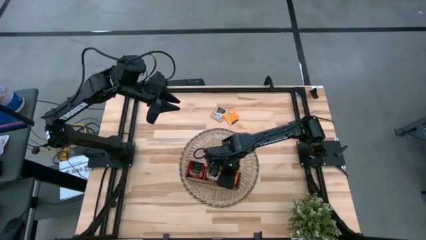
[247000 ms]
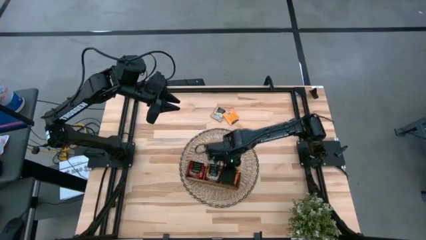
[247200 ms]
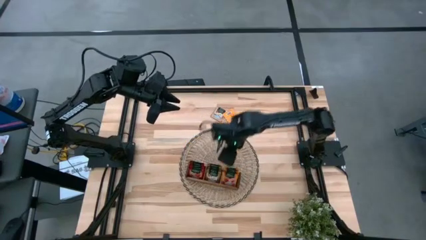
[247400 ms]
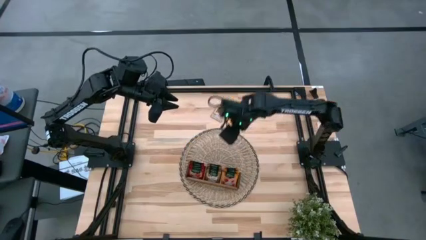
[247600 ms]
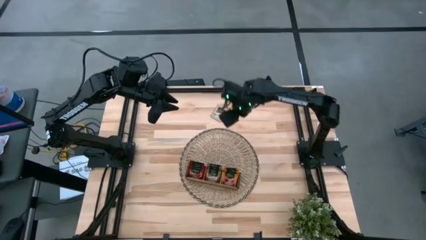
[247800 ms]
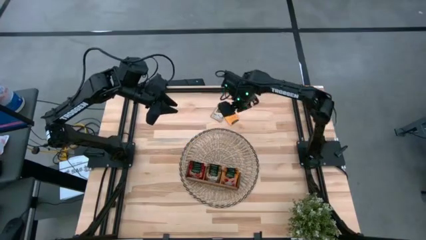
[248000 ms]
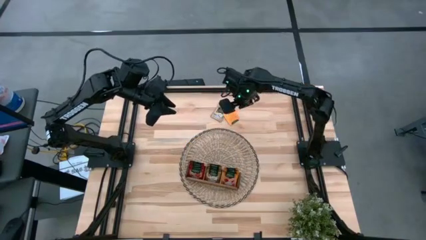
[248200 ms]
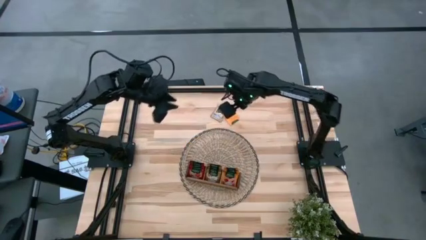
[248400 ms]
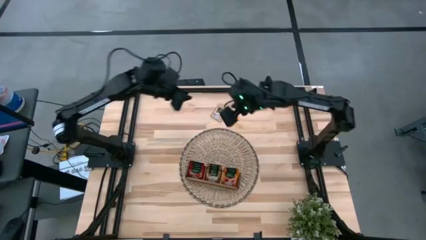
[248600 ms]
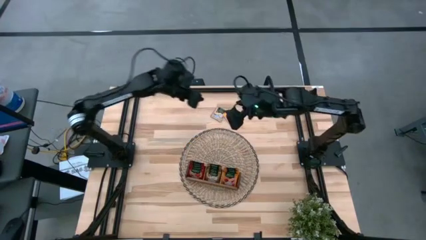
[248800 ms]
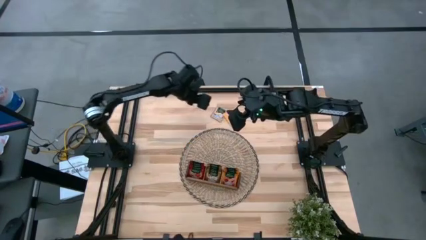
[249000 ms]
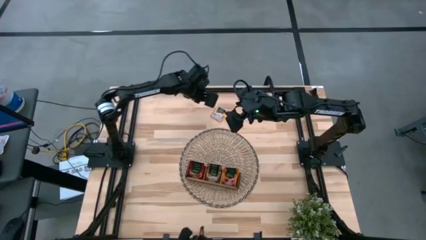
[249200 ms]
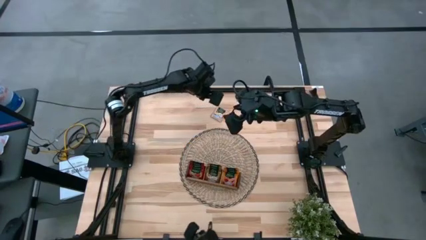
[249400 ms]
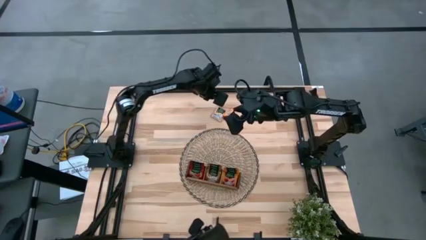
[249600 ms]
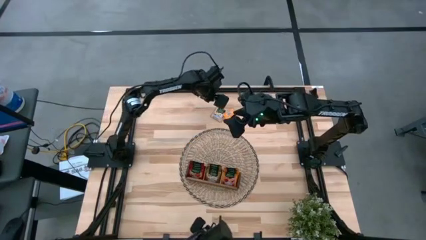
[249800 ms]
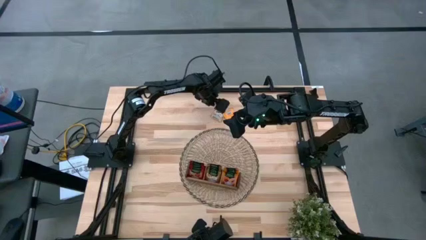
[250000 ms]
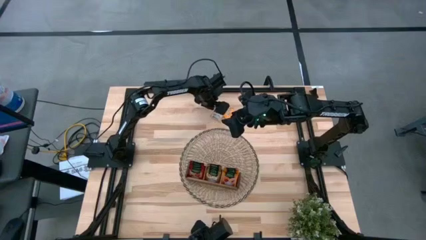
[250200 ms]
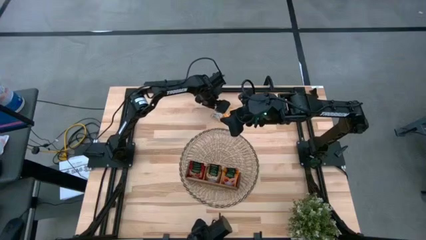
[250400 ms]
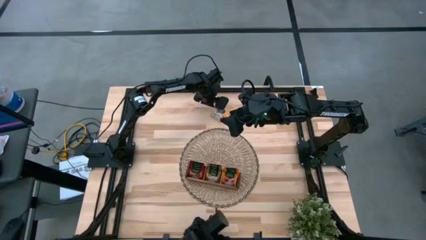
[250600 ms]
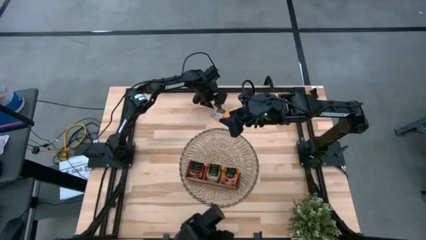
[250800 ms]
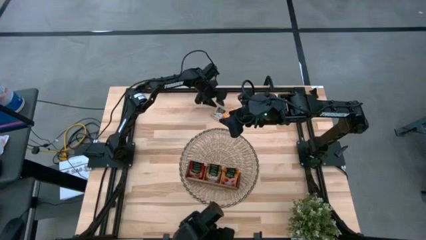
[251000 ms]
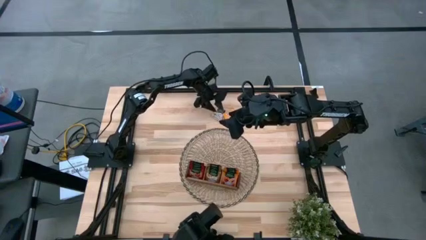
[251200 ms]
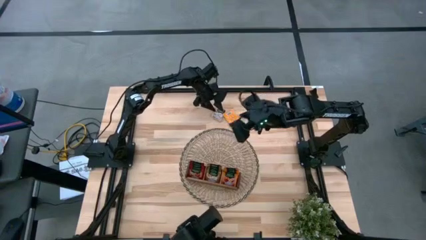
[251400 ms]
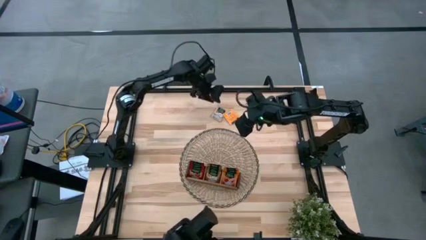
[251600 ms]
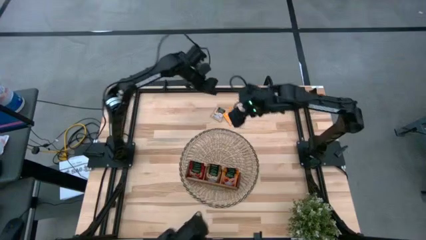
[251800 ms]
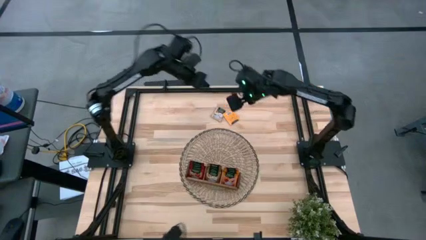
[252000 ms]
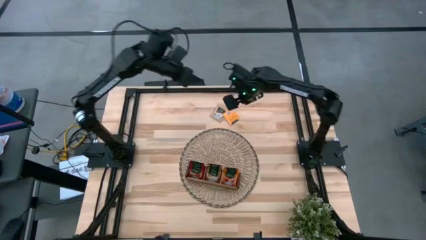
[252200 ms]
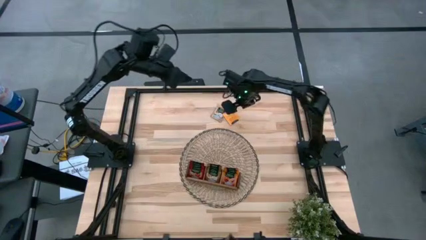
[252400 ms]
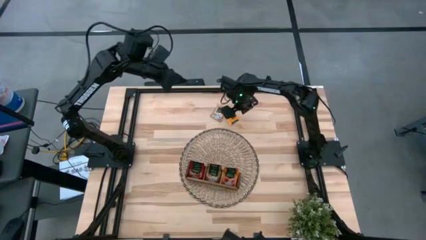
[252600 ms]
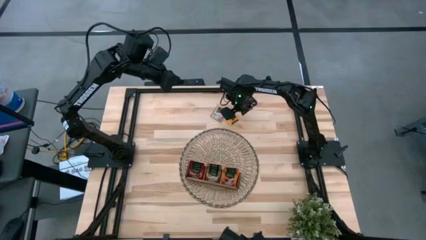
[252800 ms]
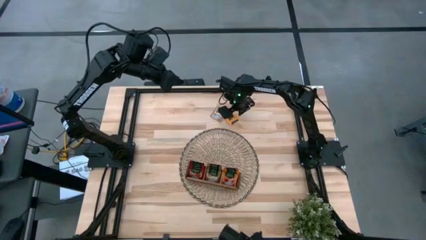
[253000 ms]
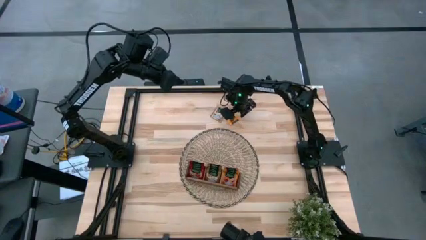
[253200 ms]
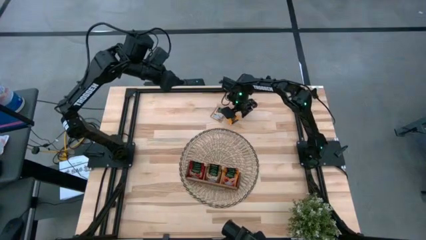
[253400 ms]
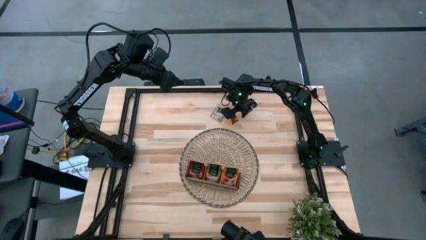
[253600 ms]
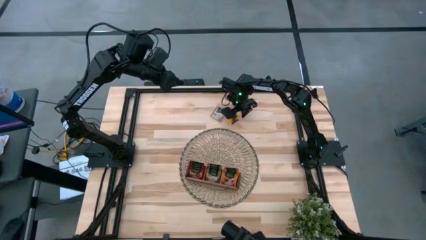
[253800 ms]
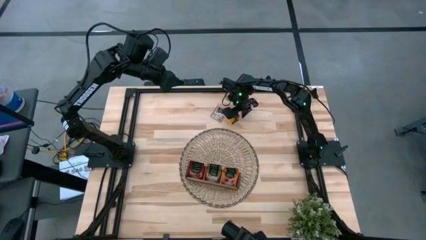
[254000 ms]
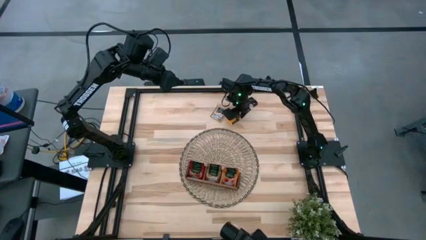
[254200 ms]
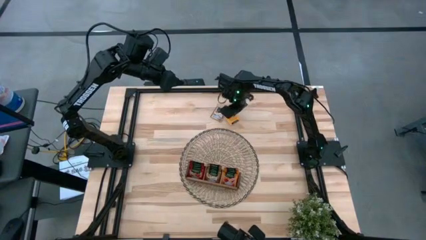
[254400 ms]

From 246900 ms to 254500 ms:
Task: Pick & Place Tea
Put the orange tea bag into the right section of the wooden organizer

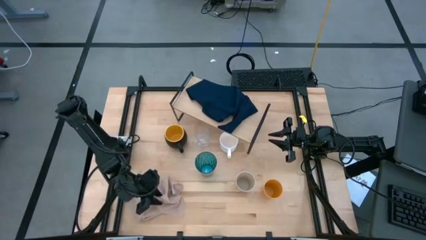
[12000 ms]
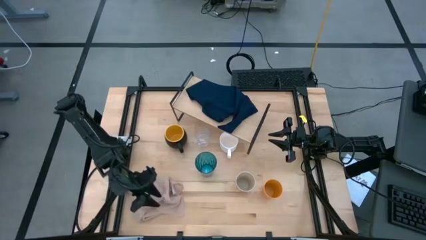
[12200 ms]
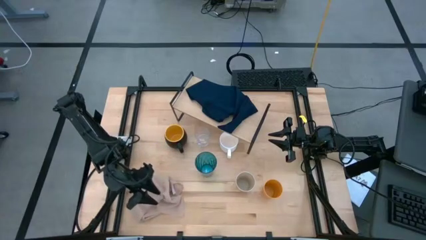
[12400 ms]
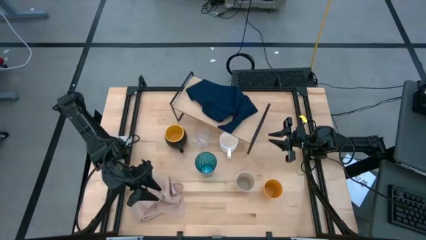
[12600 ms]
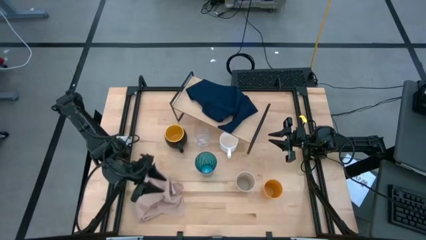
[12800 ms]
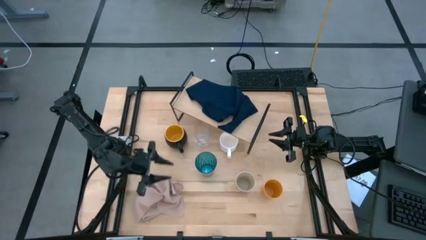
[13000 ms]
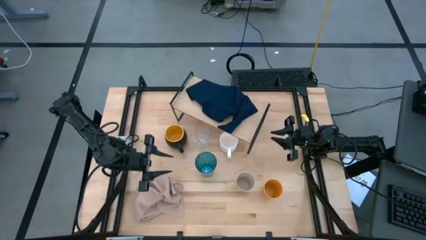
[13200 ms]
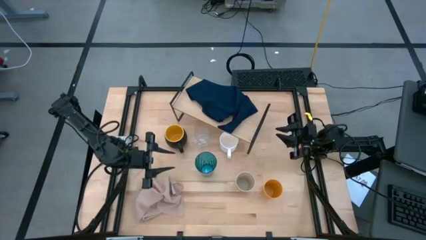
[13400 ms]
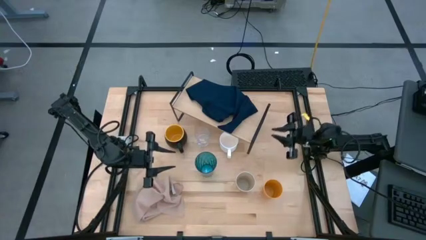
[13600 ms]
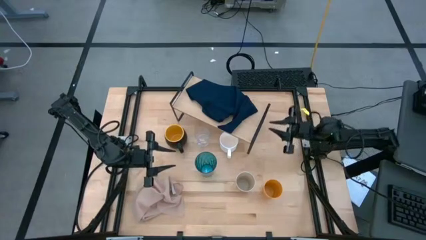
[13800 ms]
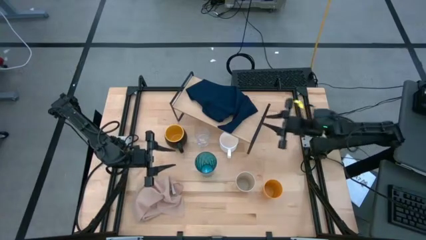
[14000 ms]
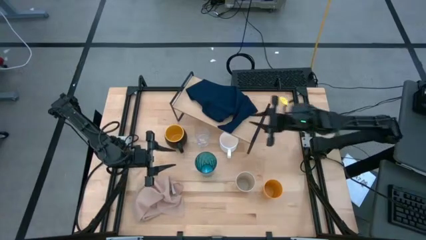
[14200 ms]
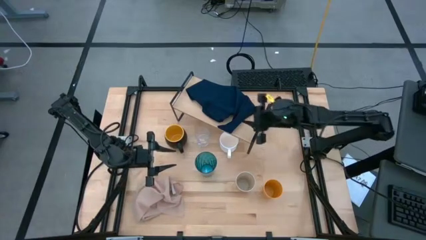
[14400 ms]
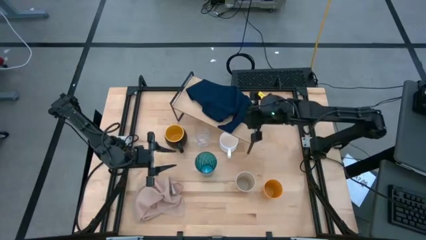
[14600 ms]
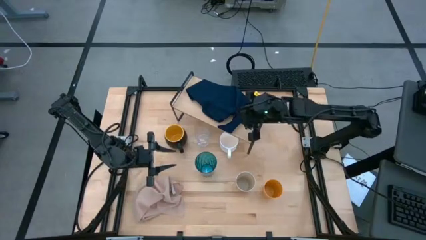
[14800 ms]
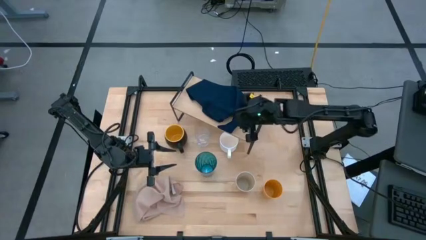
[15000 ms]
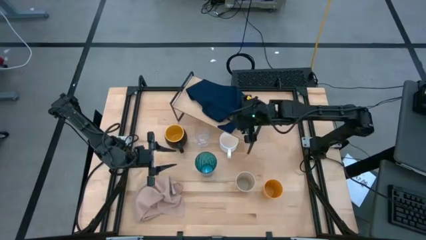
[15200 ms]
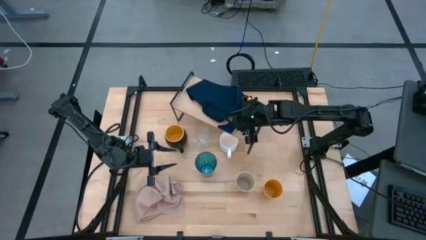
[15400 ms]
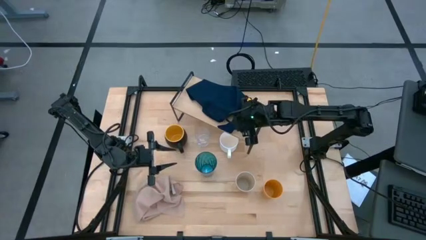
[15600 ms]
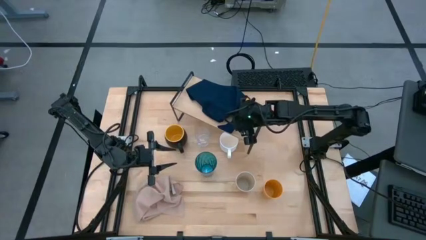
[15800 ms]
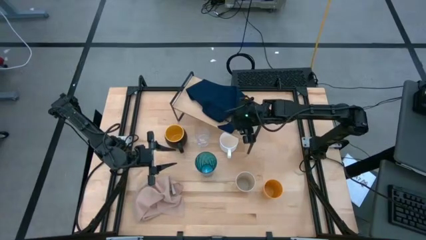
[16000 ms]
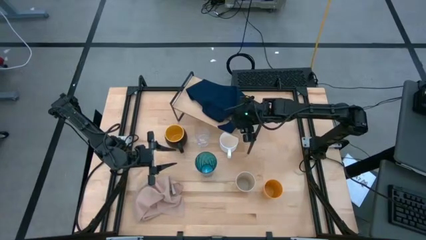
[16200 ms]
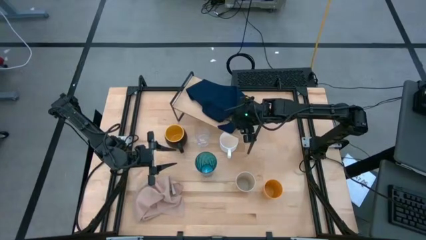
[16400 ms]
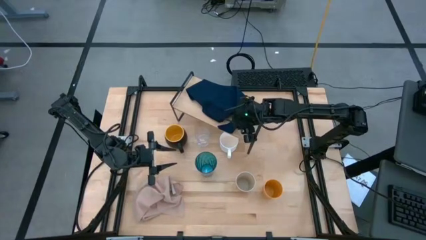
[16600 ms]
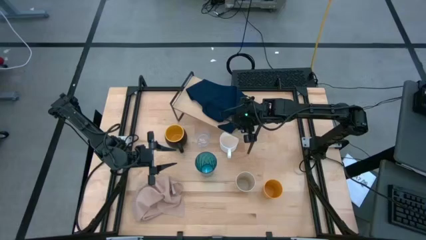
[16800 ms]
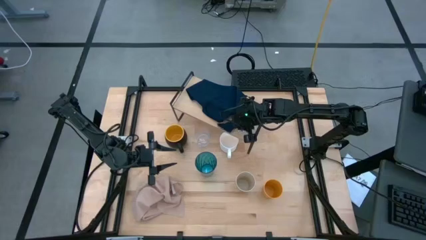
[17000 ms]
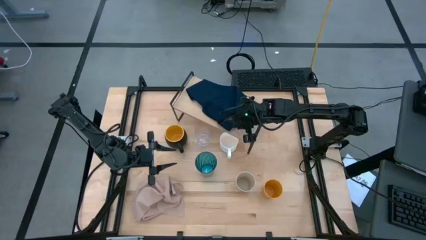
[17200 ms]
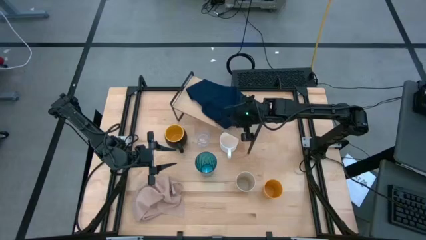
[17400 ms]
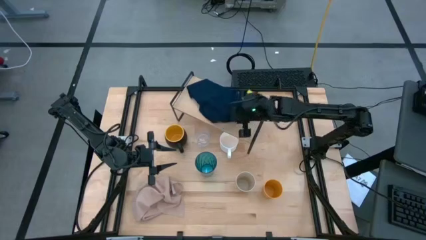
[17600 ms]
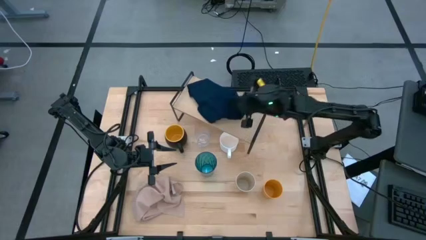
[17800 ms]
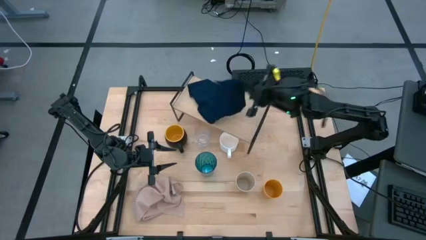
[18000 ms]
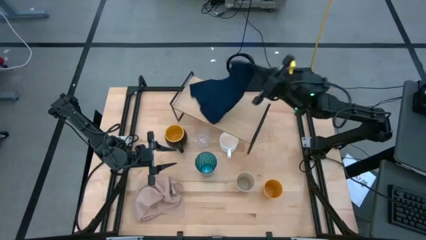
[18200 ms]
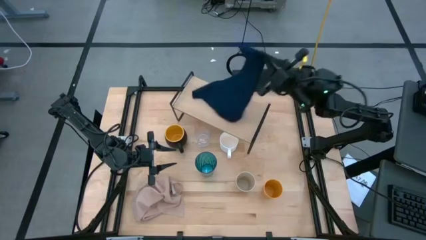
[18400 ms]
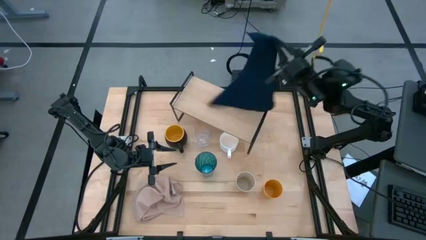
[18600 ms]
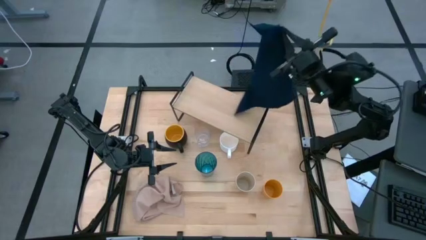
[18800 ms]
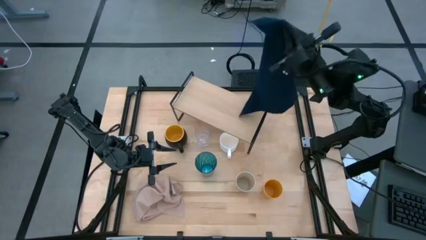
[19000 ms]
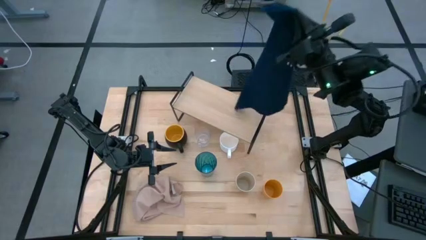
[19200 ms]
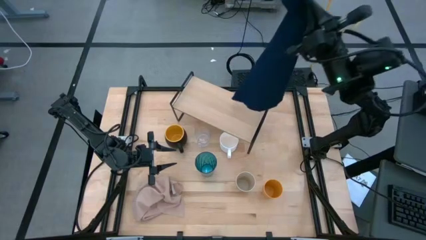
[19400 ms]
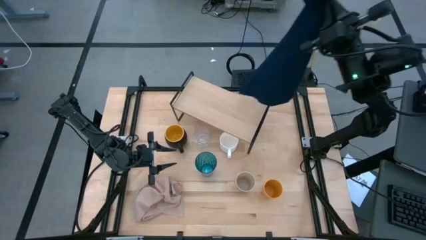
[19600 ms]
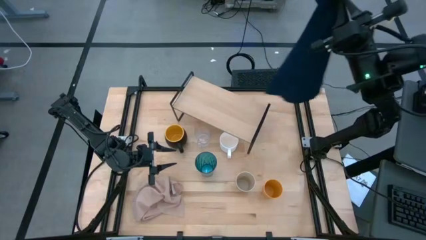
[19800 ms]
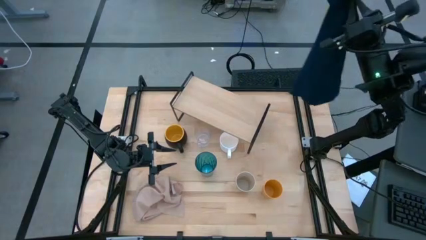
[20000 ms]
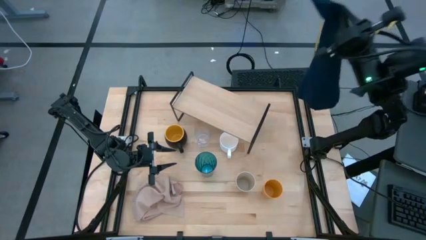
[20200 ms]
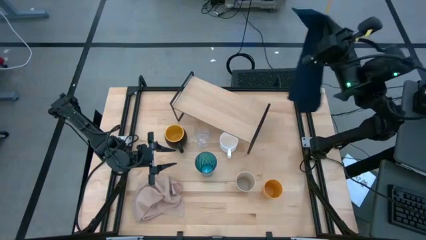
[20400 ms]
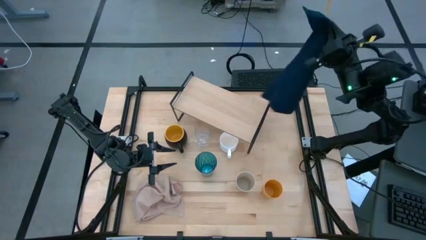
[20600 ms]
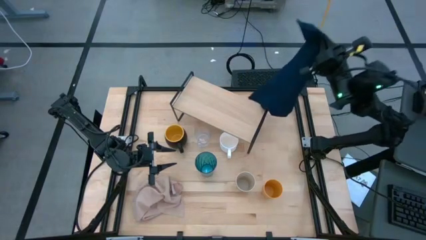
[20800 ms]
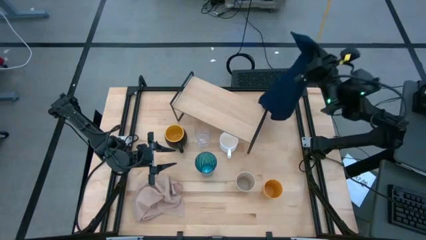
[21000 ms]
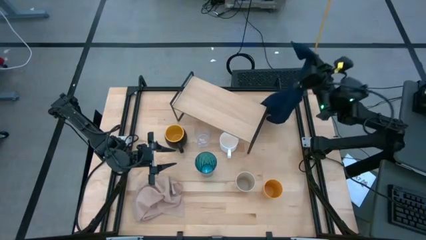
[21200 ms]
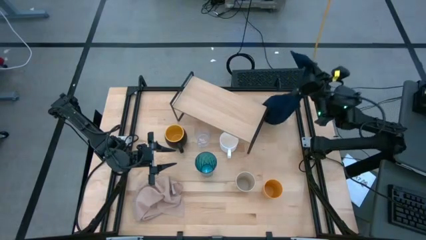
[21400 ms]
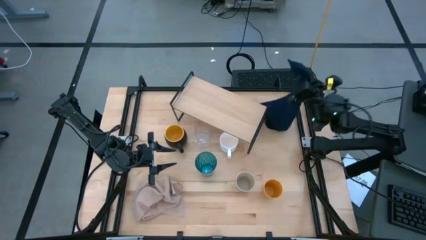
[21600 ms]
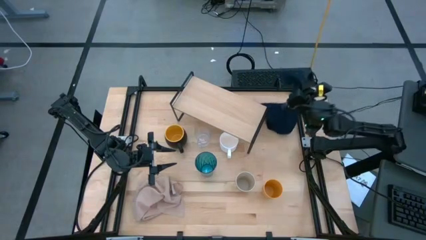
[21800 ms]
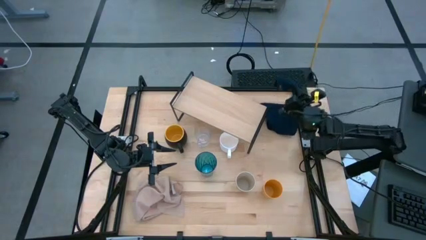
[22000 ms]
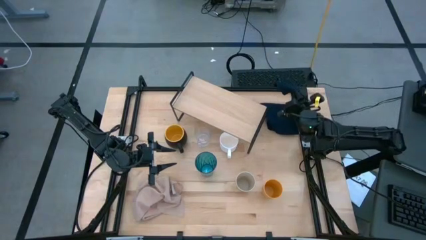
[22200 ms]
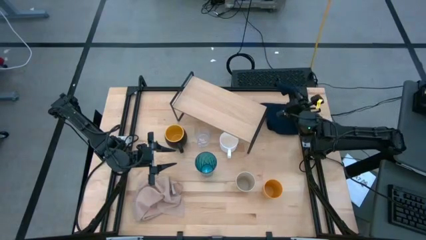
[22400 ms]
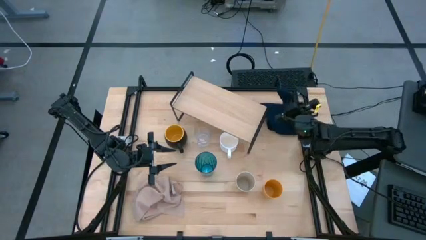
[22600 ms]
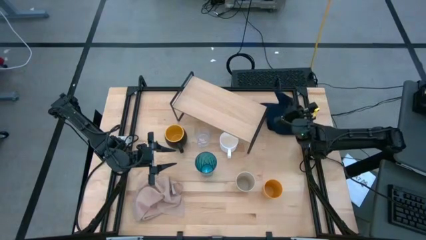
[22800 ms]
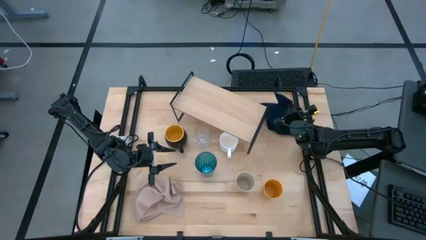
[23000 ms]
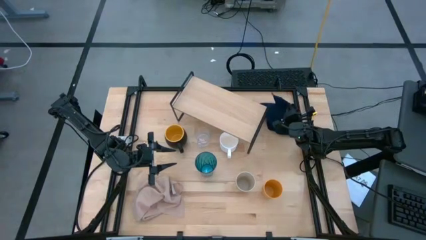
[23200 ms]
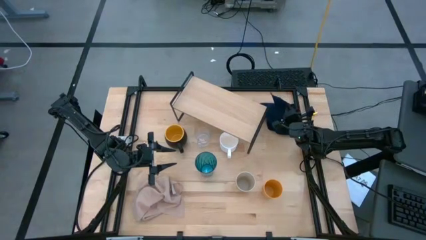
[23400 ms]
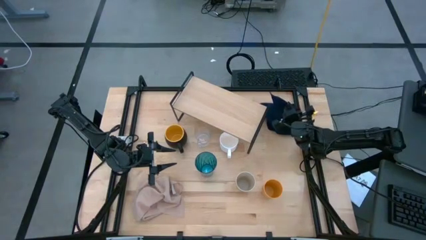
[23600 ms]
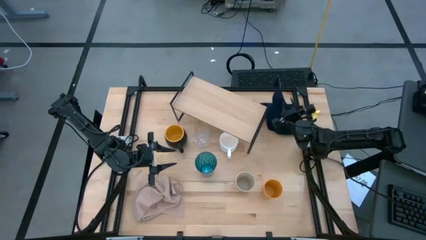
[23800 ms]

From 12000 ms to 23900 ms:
Task: Stack small to large cups/mugs on shelf
Remove the dark blue microfiber cloth from the shelf
